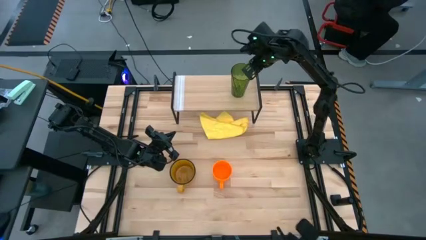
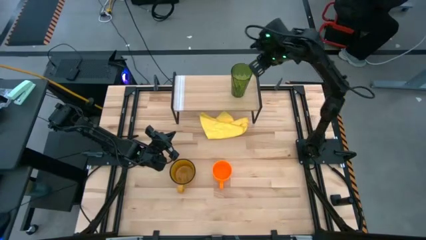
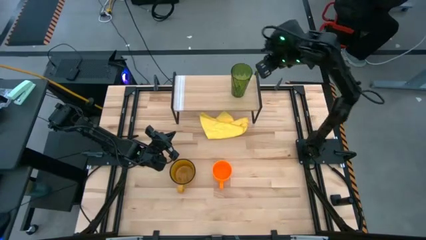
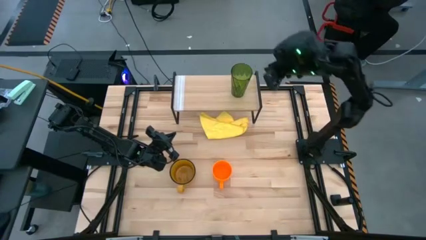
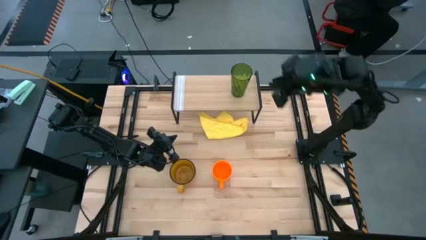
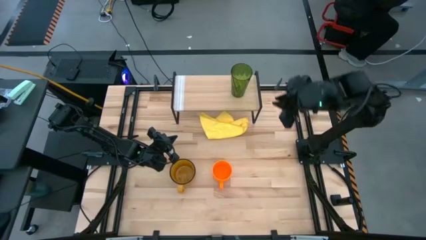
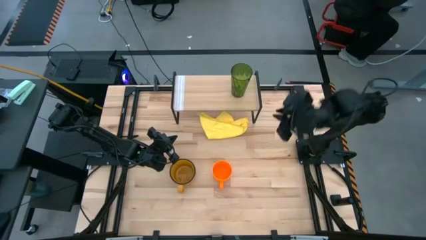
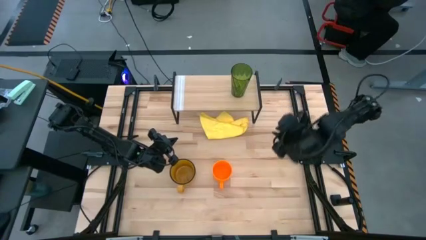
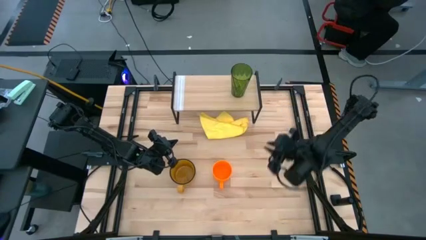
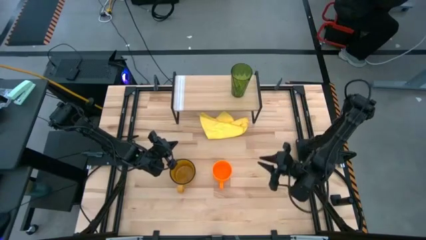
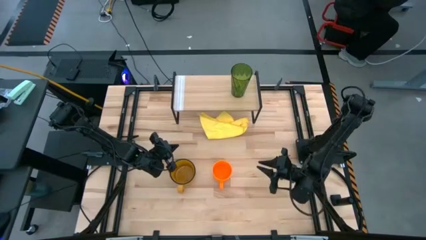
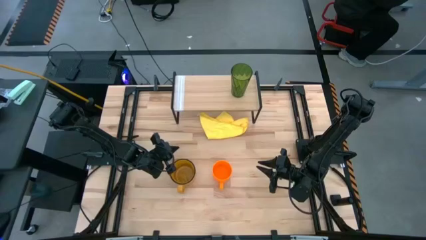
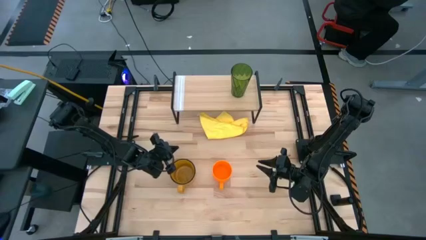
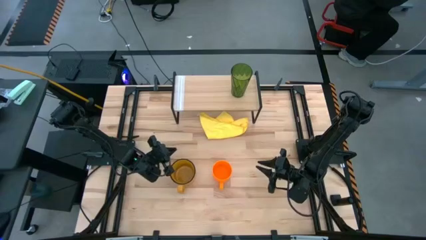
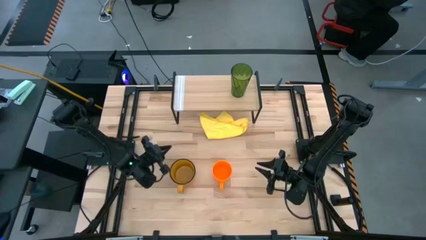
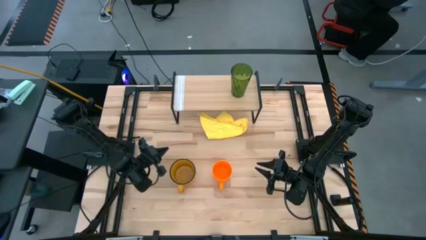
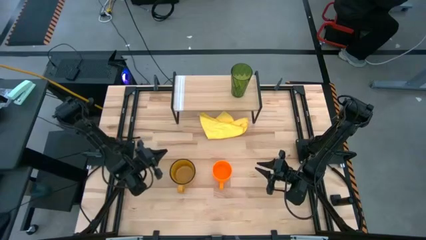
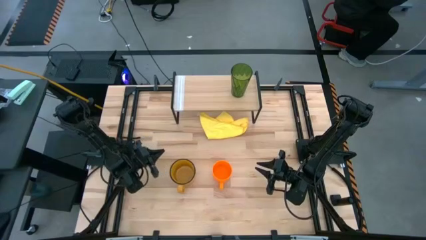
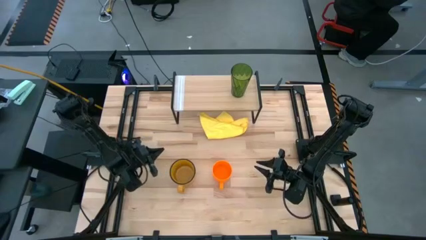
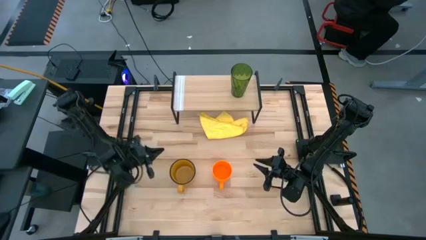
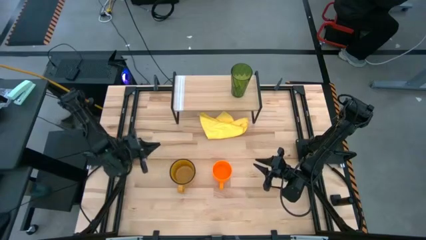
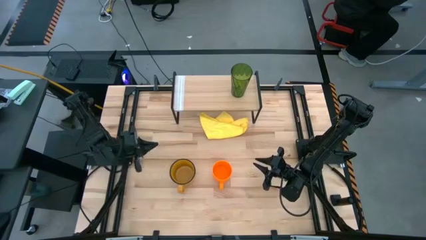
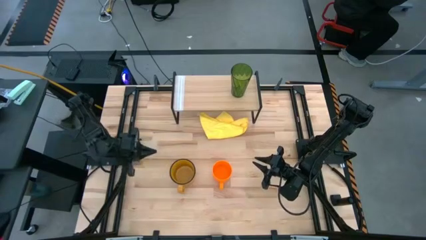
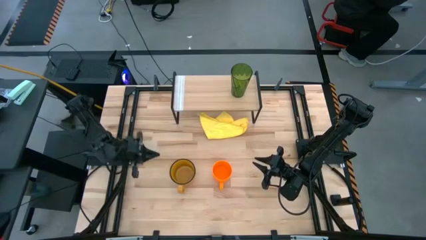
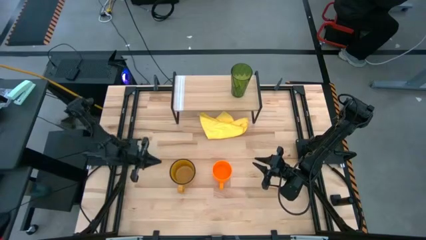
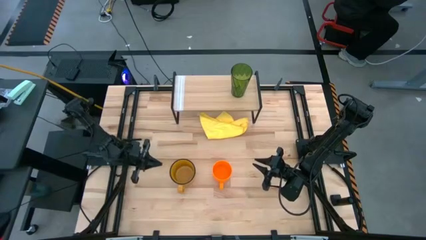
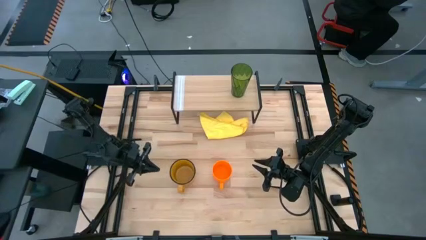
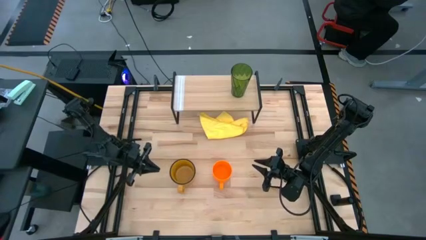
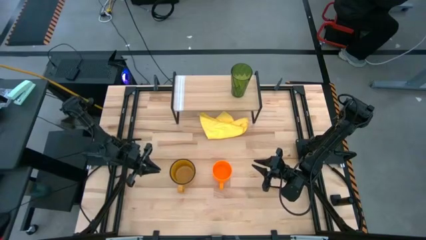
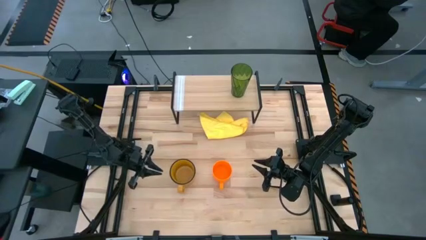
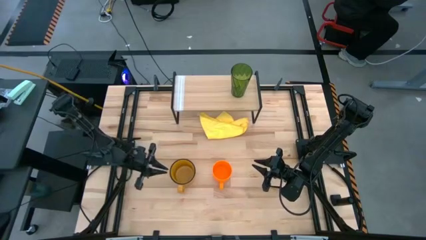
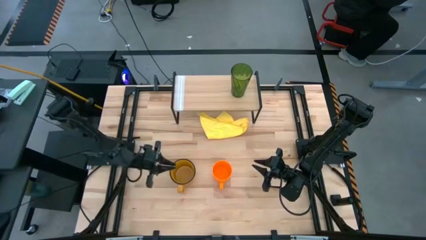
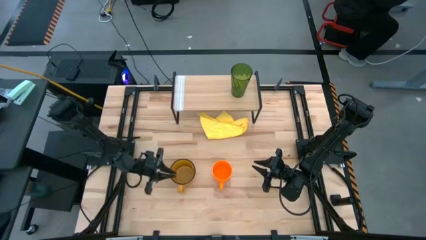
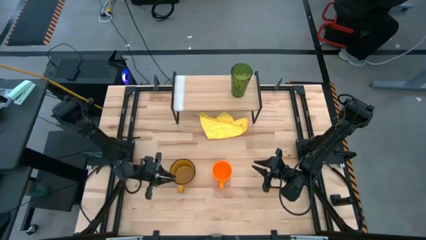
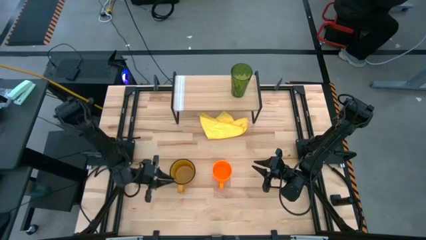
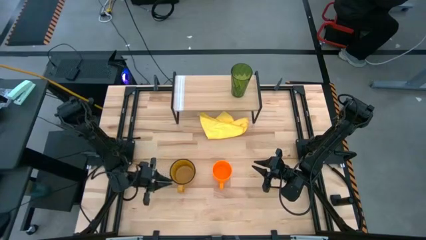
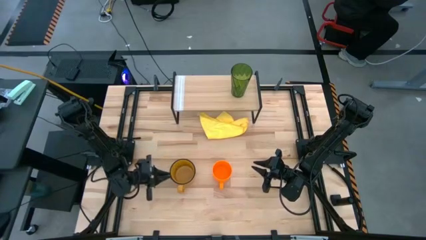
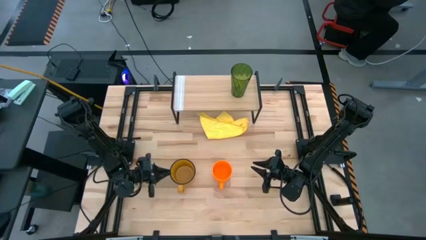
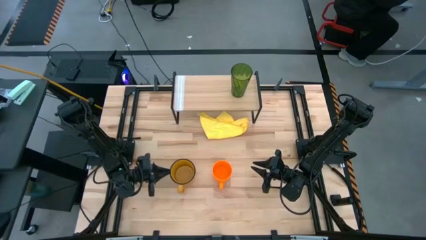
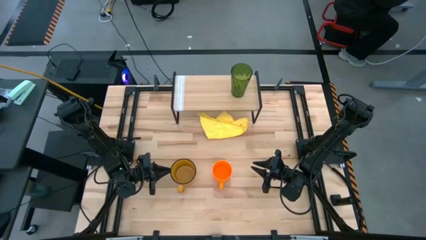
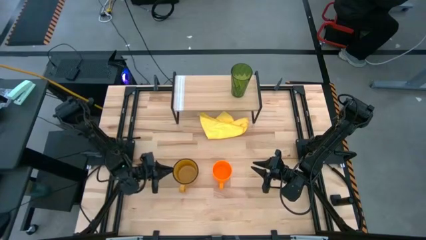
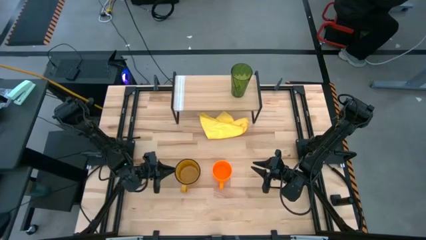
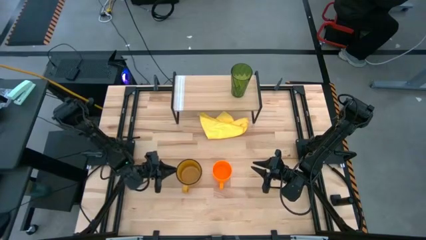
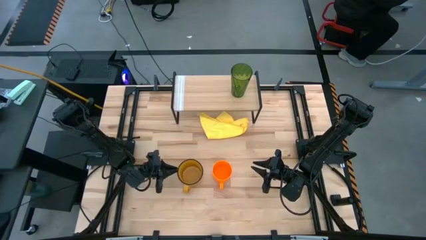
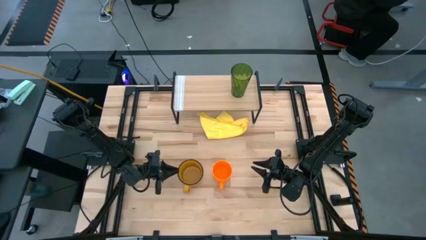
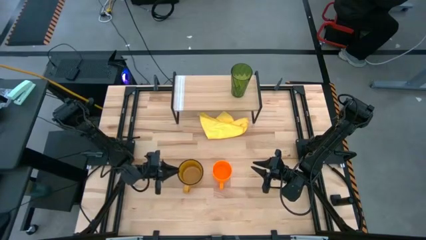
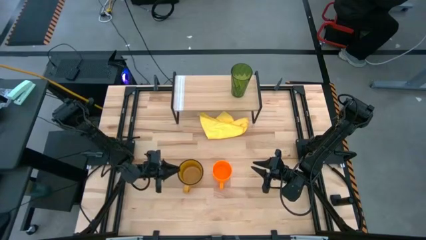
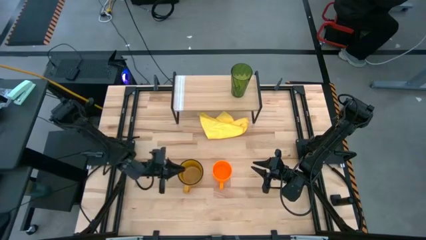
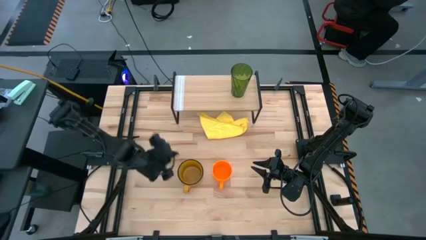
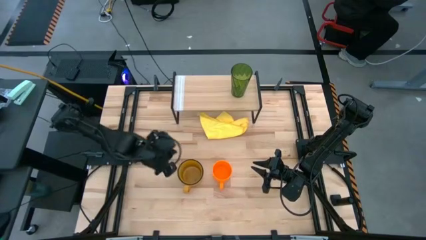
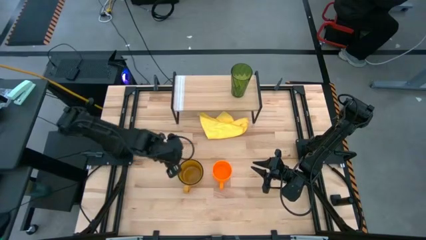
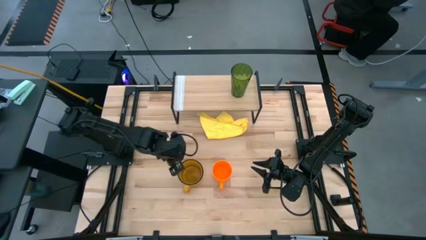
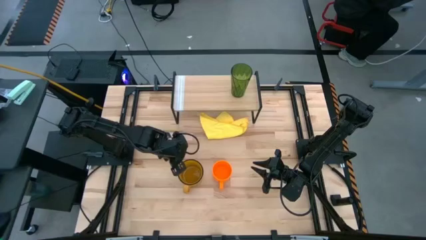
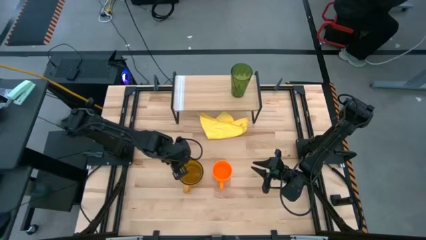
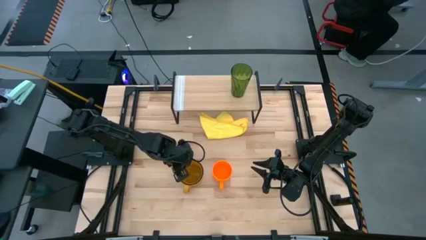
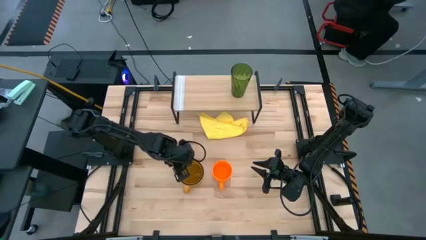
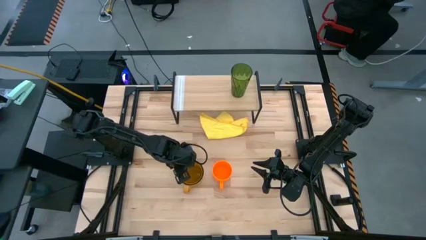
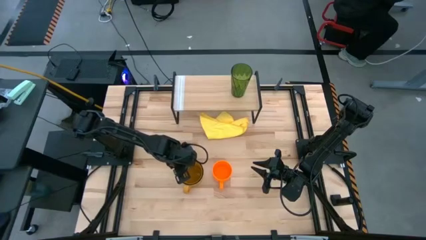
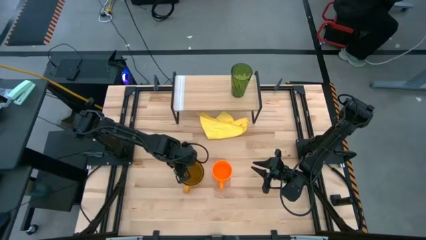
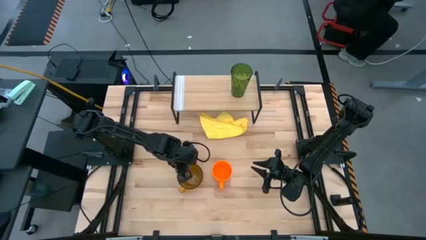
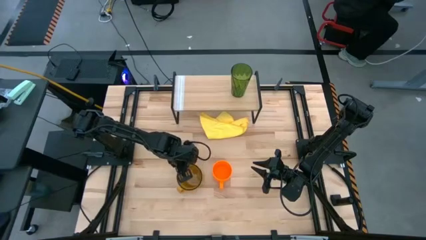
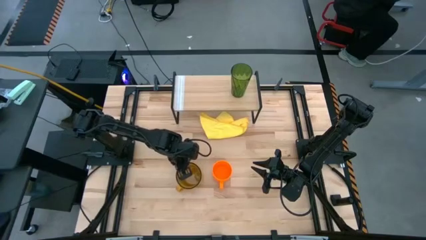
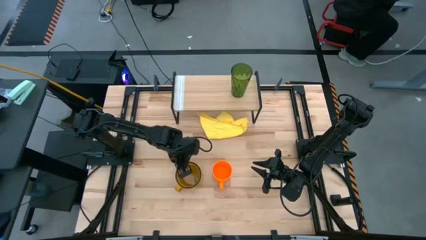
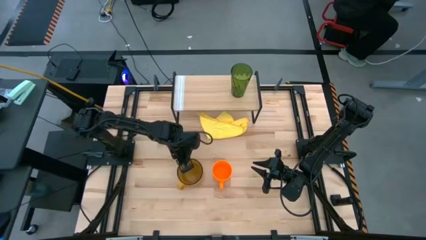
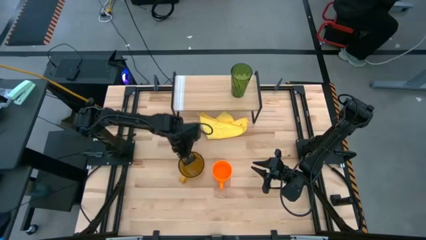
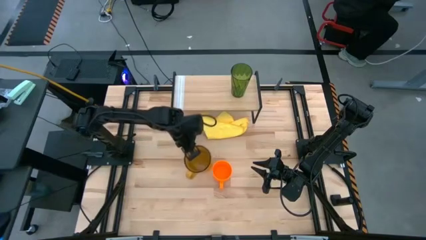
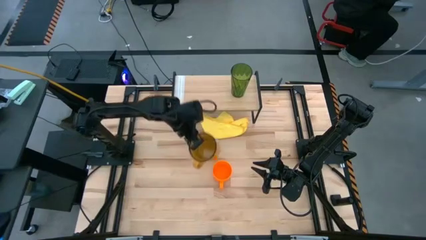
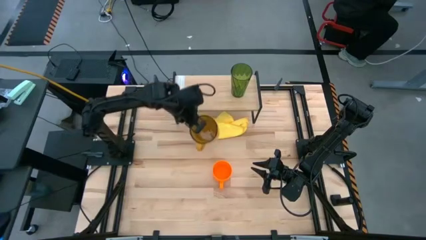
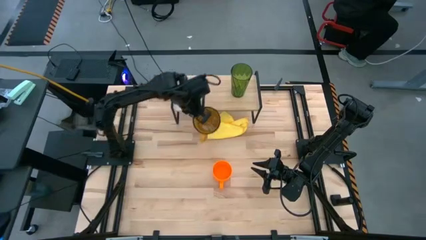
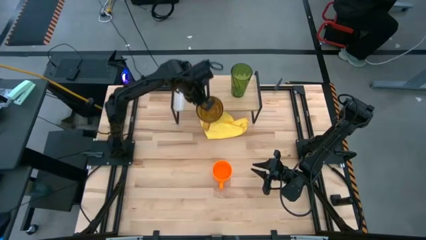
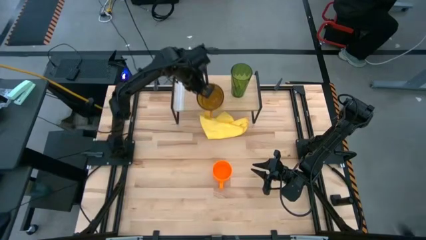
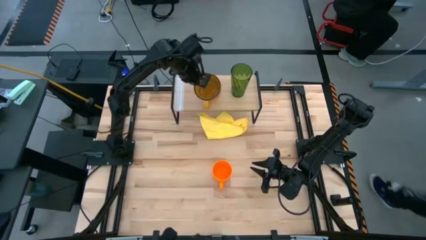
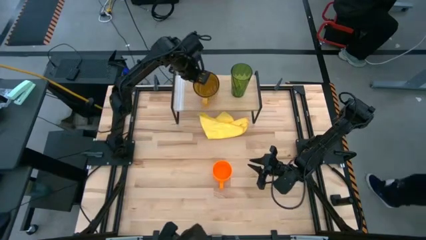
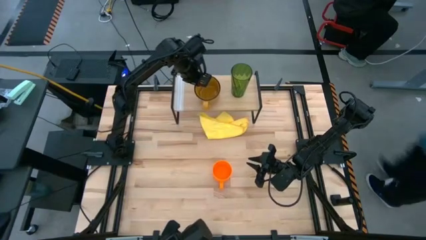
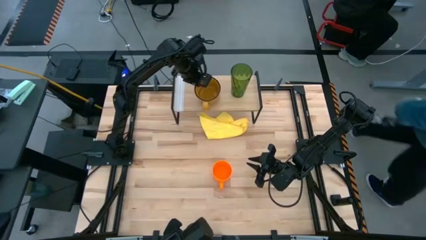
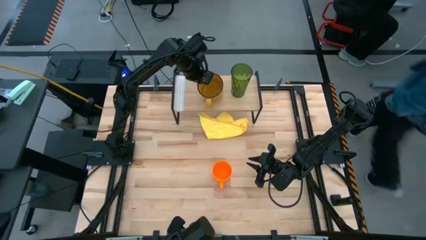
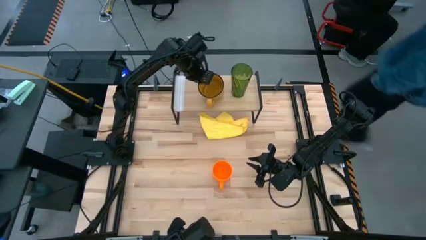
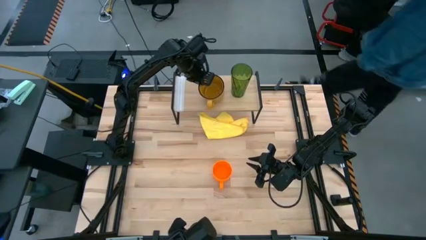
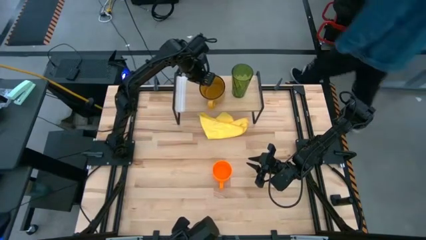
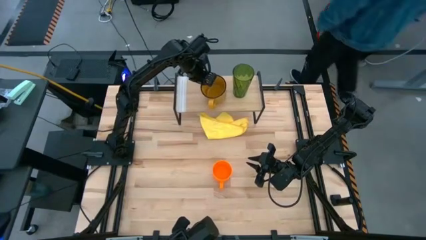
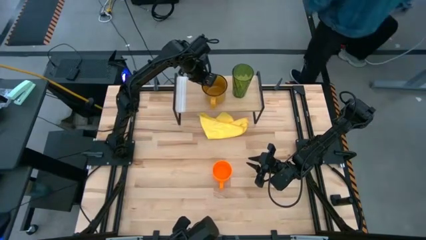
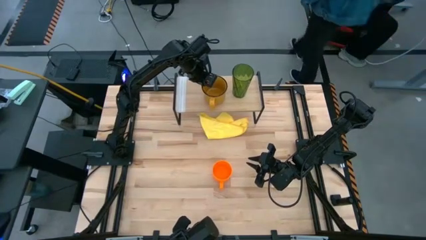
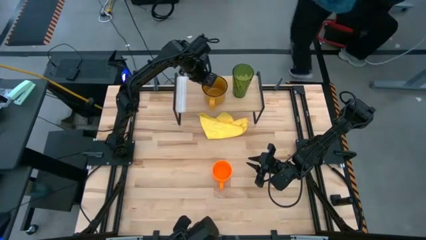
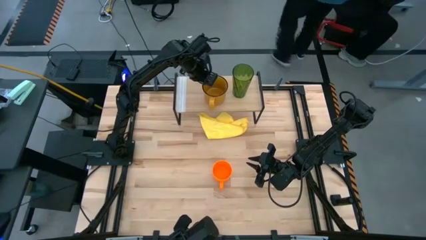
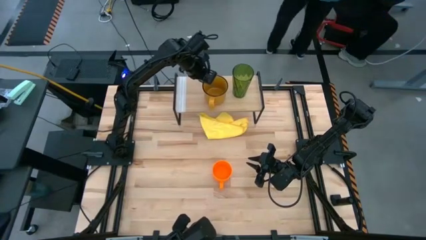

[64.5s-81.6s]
Task: Stack small to large cups/mugs on shelf
Put the yellow mug on the shelf
